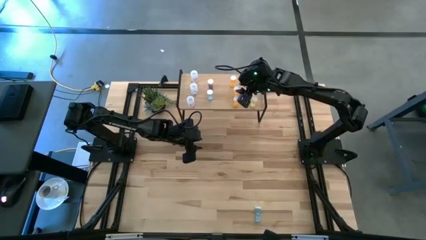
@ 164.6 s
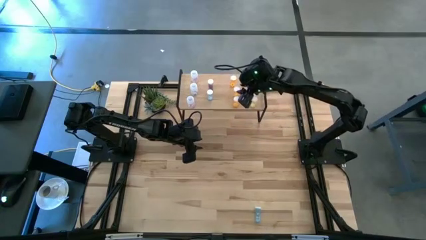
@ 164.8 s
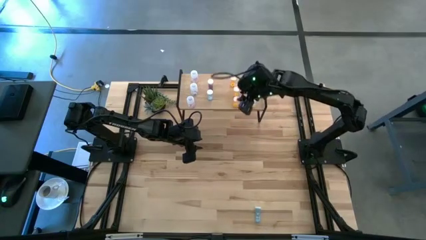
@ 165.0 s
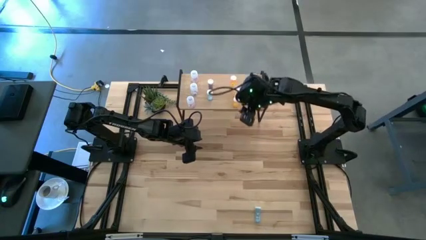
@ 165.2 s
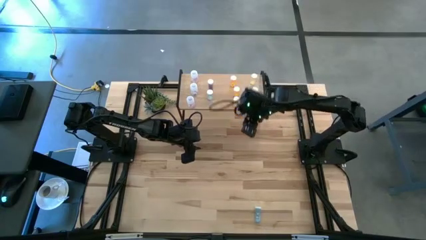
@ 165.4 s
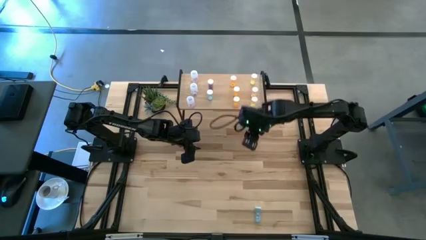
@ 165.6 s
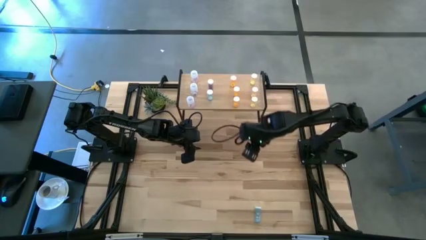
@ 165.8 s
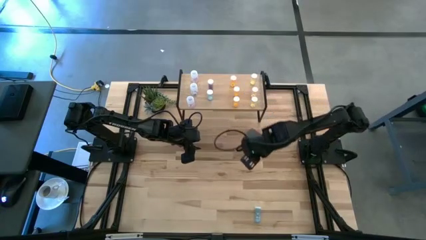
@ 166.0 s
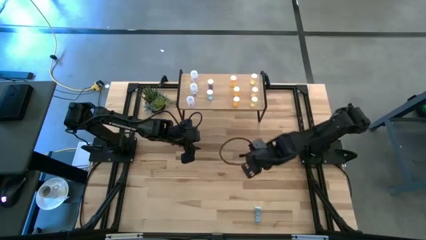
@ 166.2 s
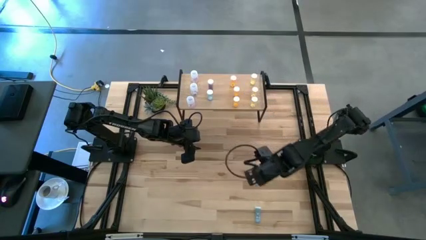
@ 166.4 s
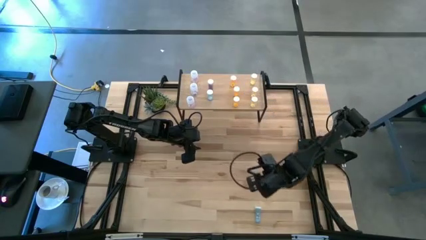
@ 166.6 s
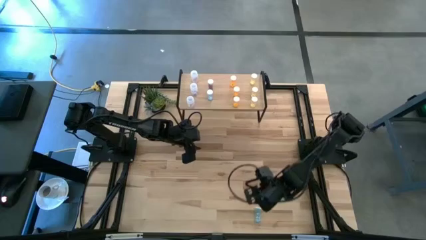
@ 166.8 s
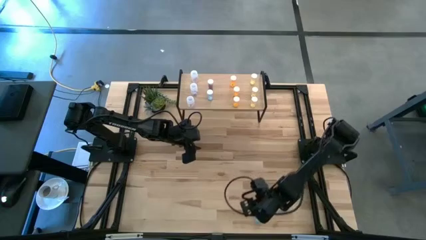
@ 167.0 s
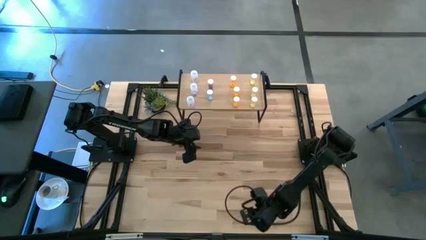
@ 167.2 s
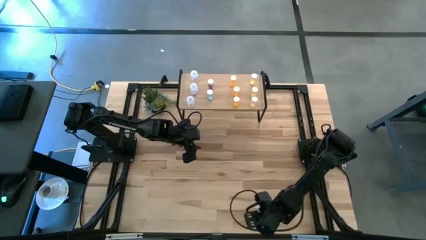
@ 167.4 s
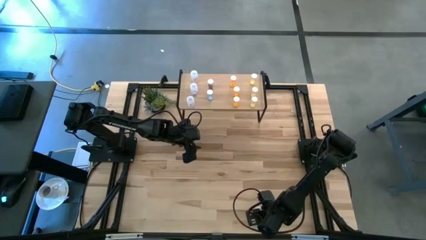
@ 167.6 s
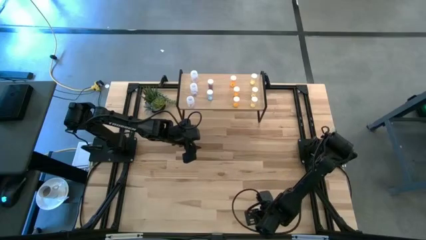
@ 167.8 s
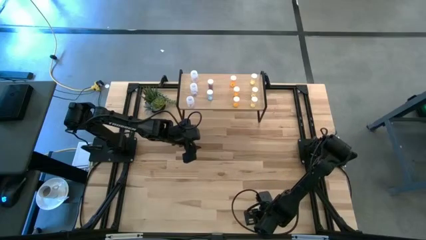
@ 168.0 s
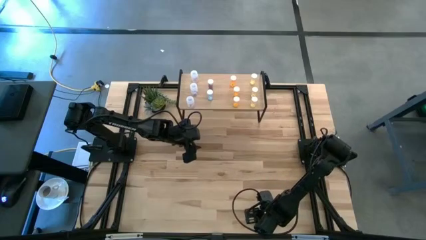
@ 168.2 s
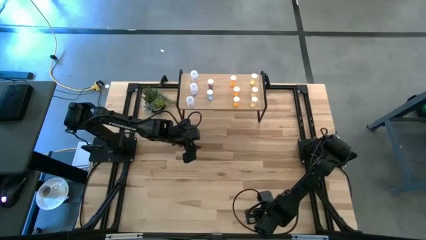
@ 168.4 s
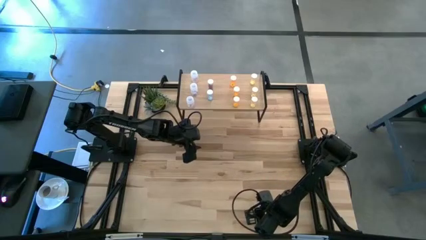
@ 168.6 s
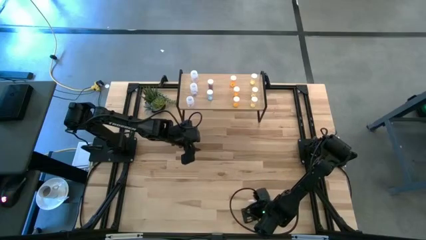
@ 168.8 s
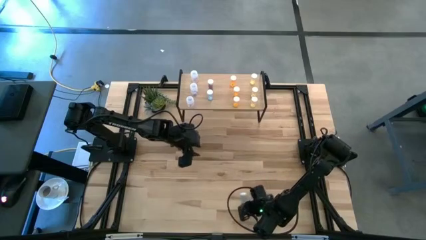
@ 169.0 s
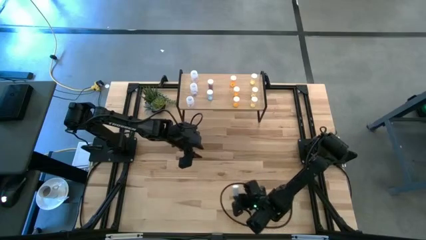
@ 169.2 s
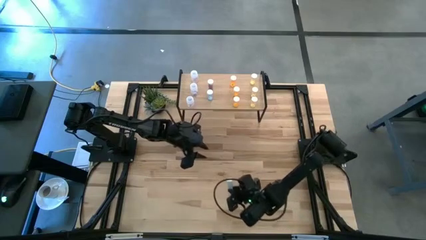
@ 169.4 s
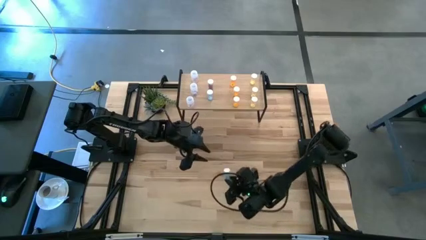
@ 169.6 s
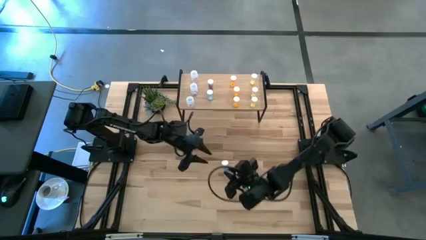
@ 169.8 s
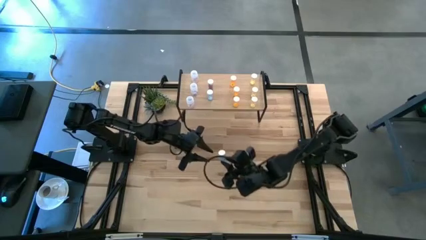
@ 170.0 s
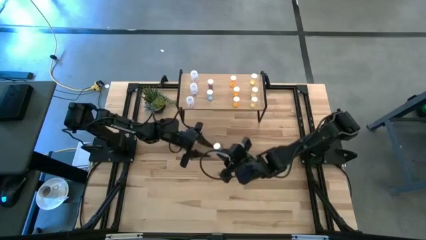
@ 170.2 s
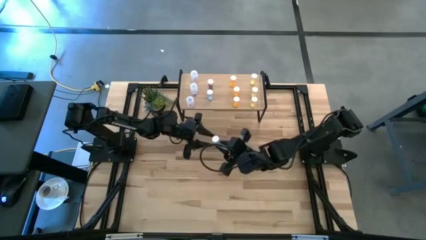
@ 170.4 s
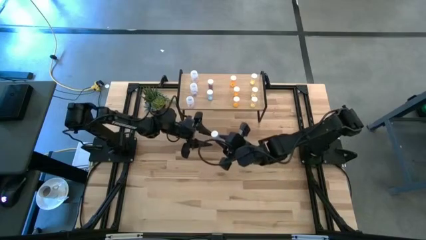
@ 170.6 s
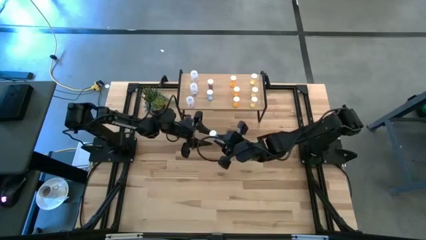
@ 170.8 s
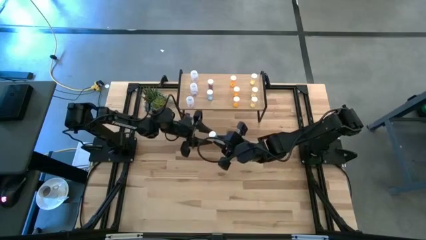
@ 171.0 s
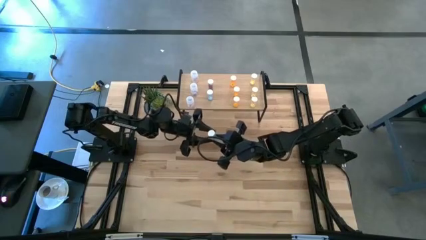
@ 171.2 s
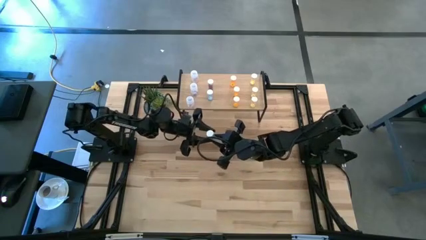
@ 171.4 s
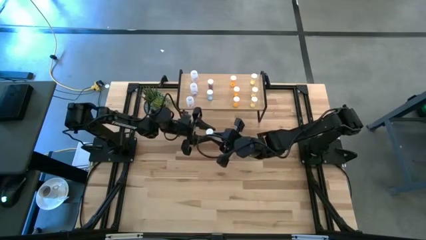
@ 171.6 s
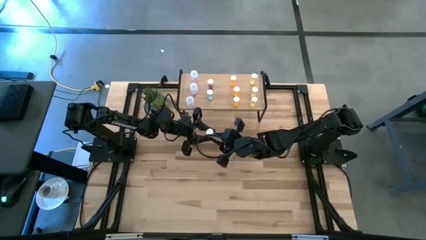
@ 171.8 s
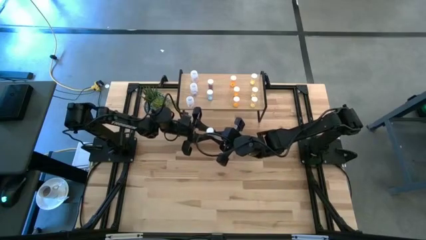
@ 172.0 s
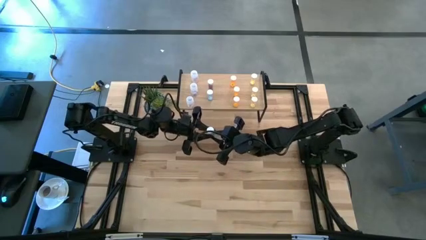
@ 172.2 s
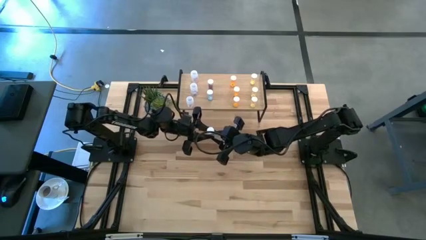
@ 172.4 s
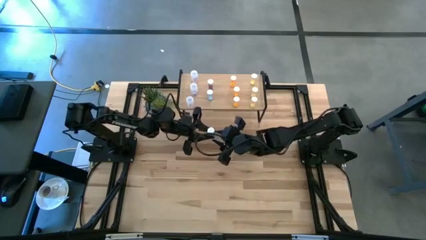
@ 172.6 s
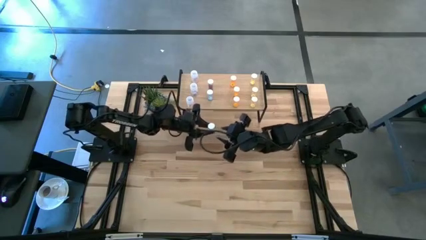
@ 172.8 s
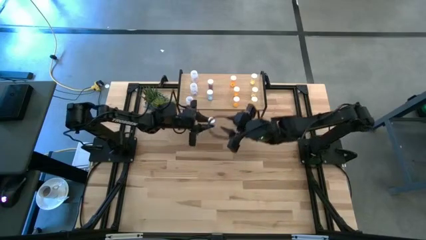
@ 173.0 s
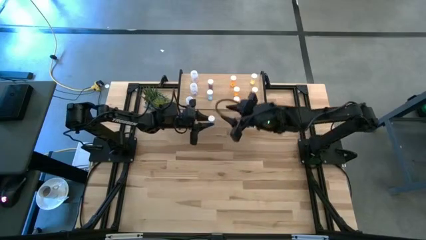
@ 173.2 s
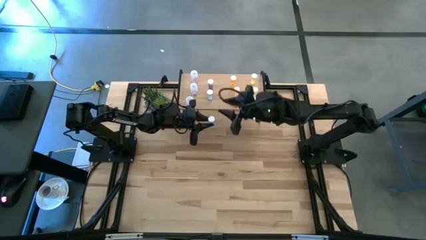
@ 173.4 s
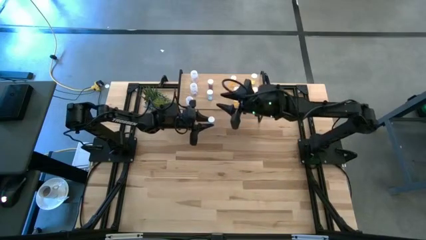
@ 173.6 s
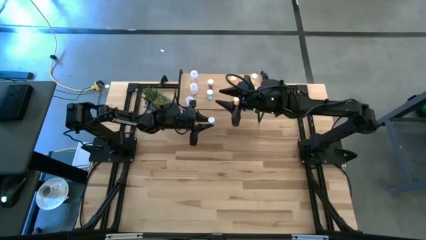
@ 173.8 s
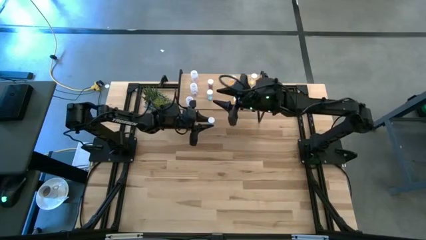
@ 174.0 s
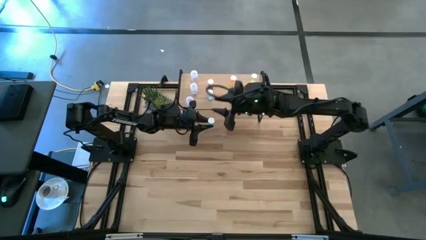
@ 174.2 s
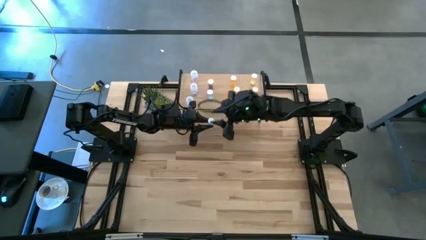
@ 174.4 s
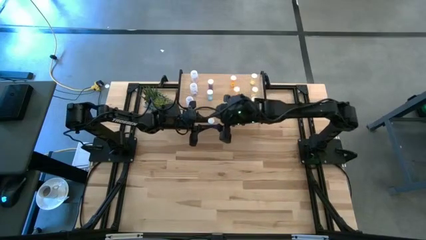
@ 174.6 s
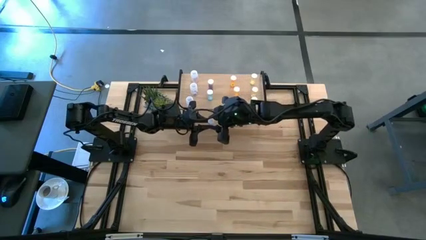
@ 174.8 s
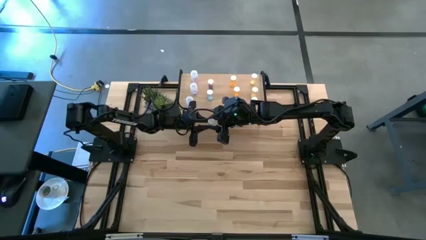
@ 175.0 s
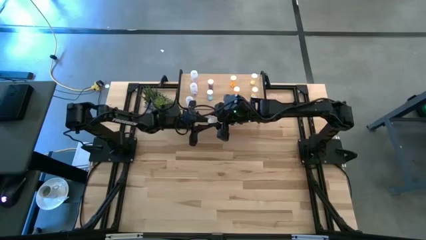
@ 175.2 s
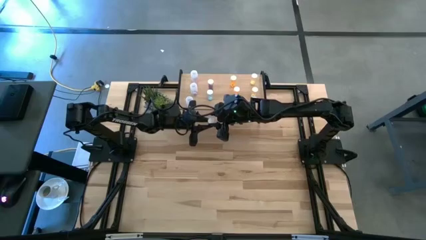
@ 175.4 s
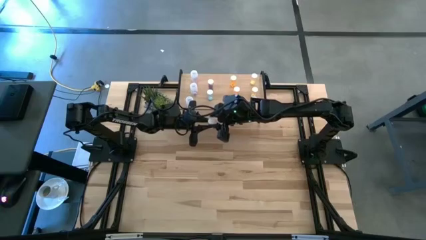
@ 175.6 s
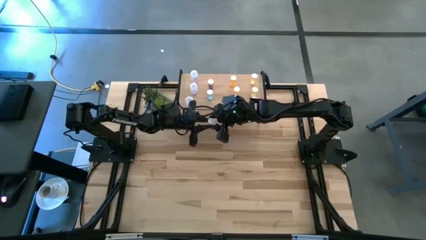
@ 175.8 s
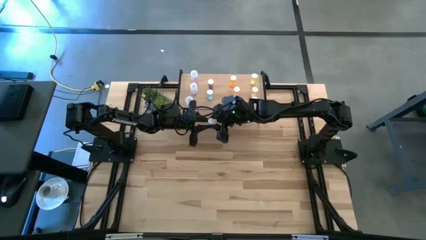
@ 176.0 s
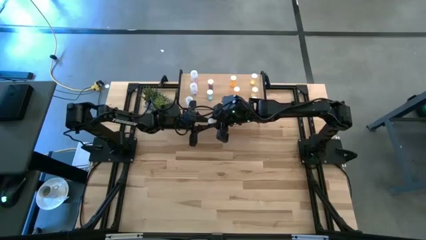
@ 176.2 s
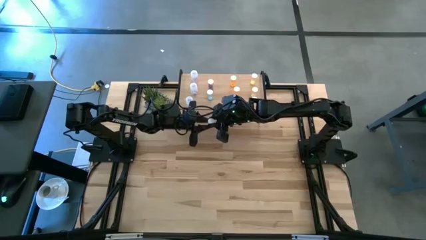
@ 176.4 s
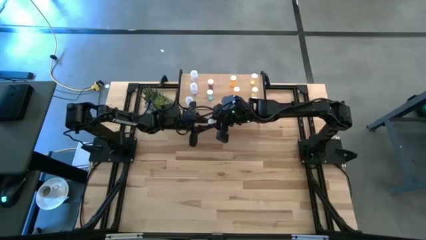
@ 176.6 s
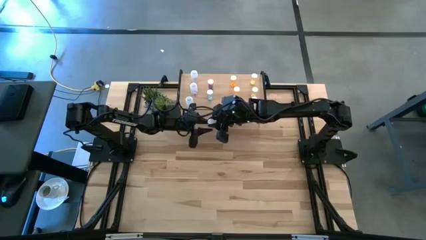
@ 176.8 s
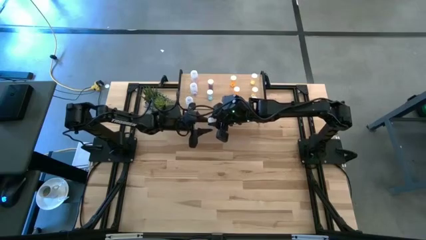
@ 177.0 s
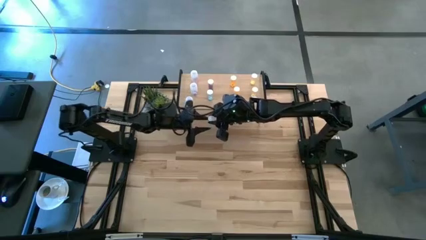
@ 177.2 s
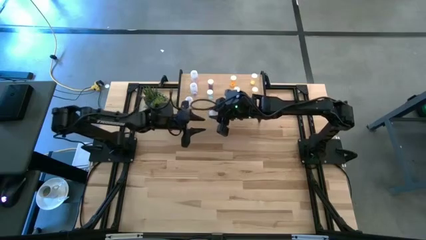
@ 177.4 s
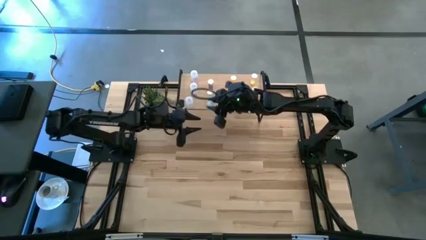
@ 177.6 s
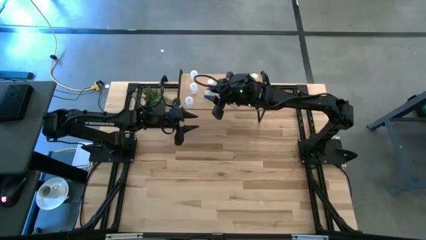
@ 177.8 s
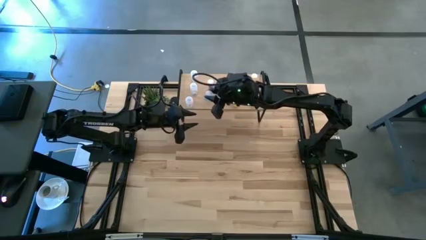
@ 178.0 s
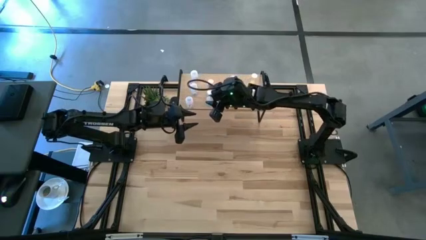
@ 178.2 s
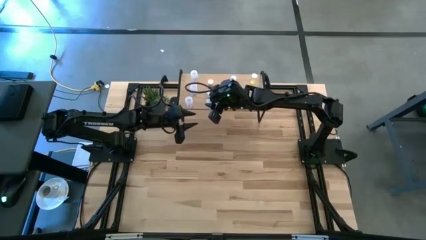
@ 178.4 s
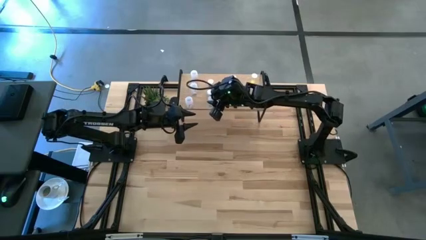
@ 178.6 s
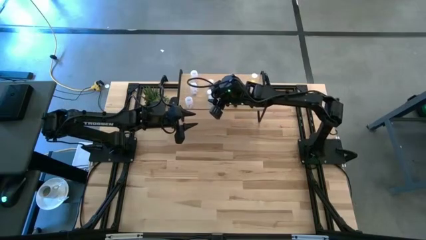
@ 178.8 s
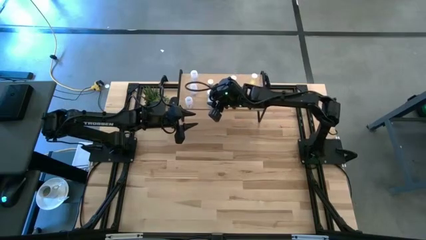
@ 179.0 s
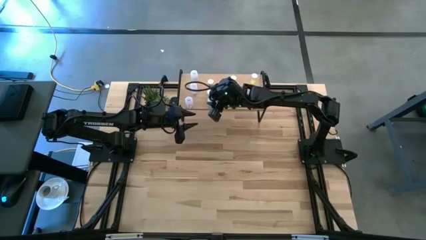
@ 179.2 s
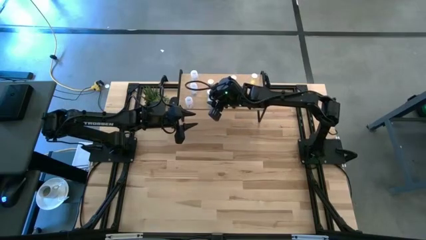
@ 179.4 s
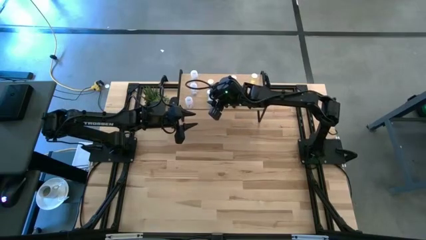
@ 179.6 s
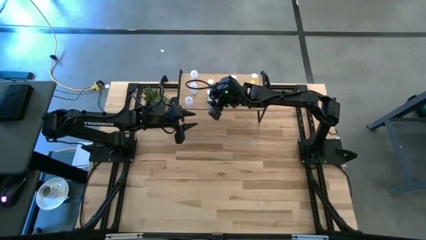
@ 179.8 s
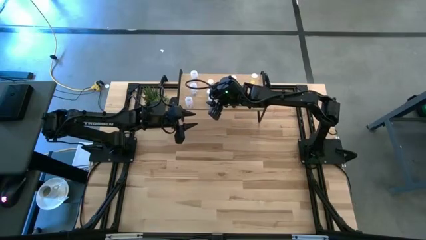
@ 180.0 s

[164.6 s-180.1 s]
Task: Pick and place medicine bottles onto shelf by color
Put the blue medicine bottle on the shelf aligned with the blue pill bottles

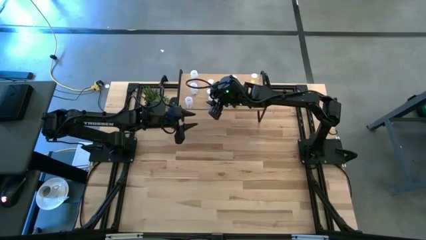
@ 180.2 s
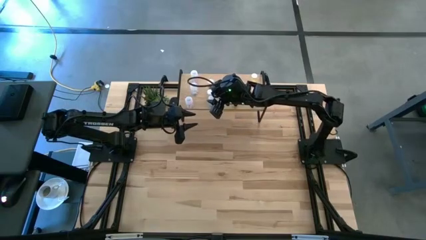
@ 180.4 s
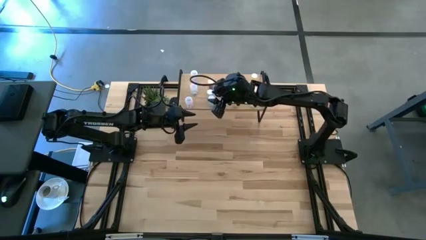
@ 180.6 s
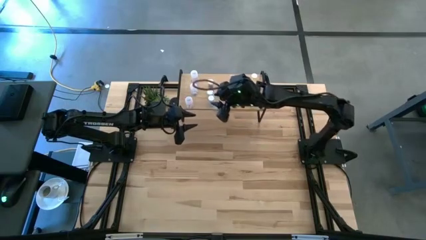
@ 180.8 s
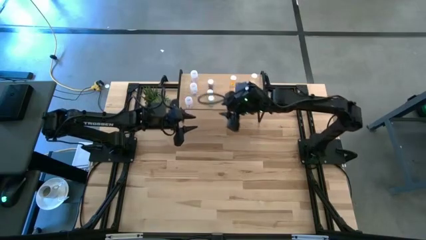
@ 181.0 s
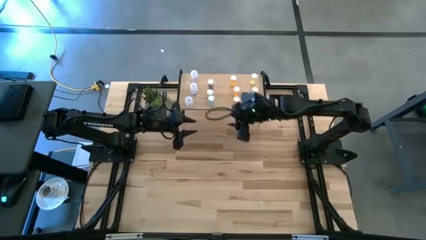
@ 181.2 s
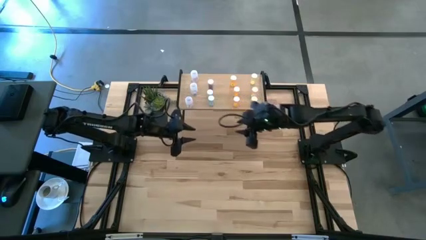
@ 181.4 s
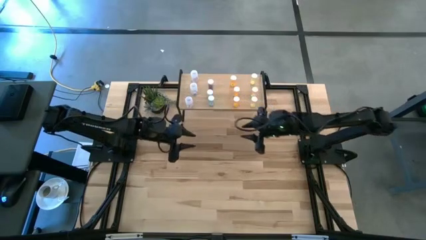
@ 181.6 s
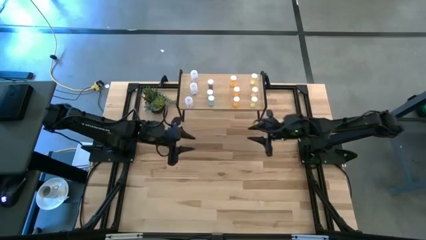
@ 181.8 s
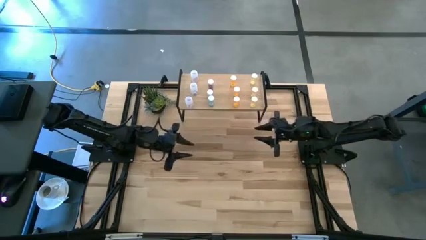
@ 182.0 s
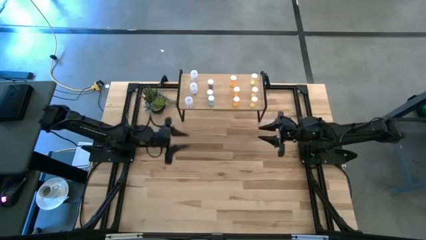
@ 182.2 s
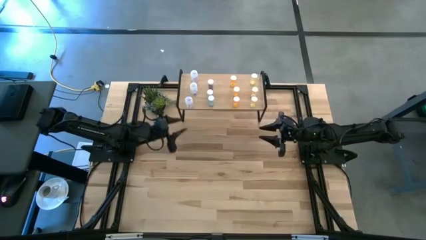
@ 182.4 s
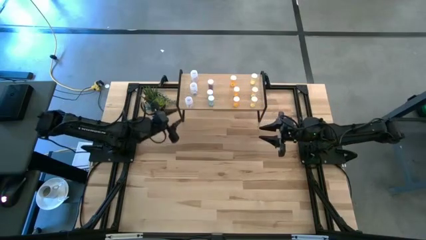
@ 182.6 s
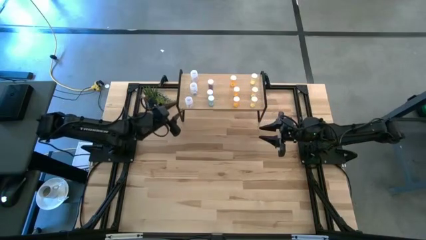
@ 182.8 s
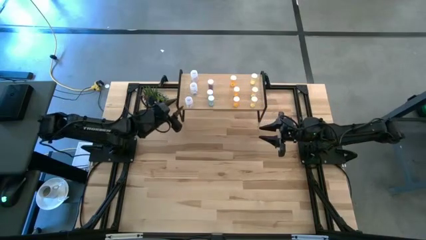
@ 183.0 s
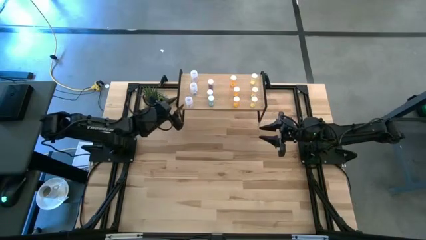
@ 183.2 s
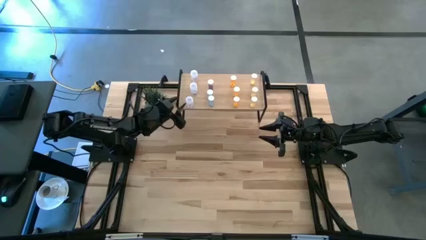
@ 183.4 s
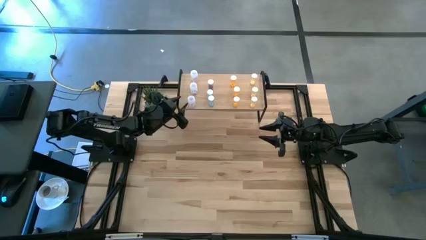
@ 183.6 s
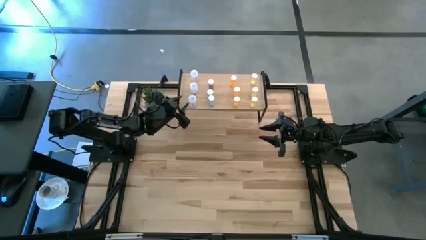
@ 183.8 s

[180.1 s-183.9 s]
Adjust the transparent pill bottle on the shelf
